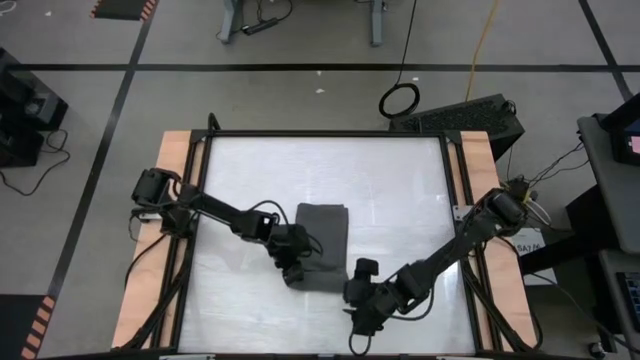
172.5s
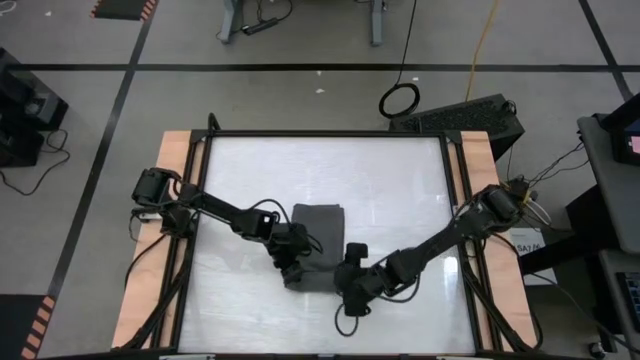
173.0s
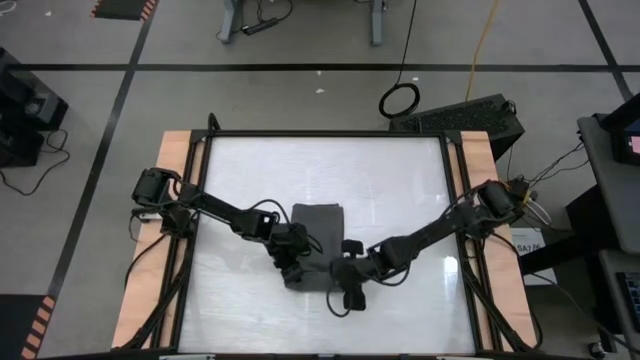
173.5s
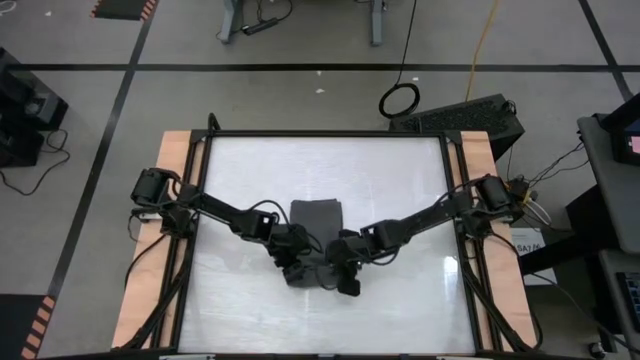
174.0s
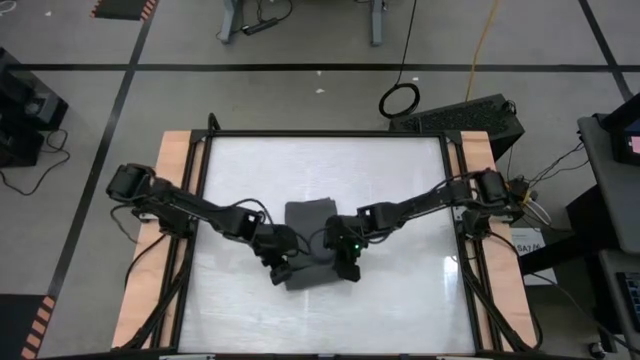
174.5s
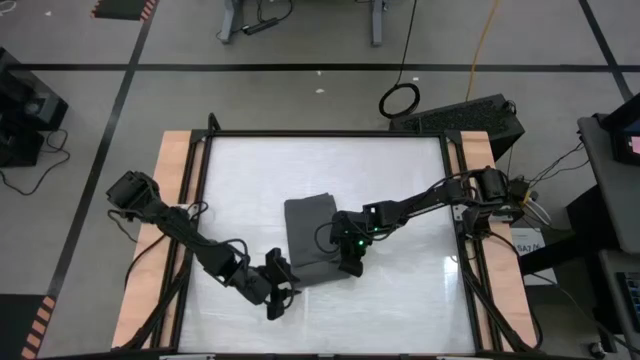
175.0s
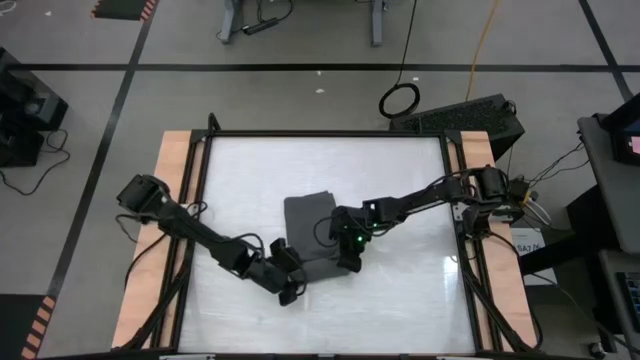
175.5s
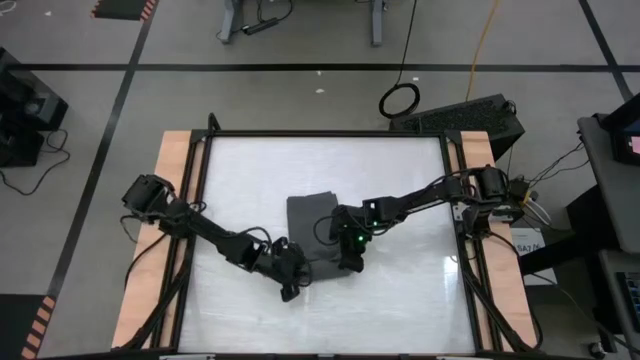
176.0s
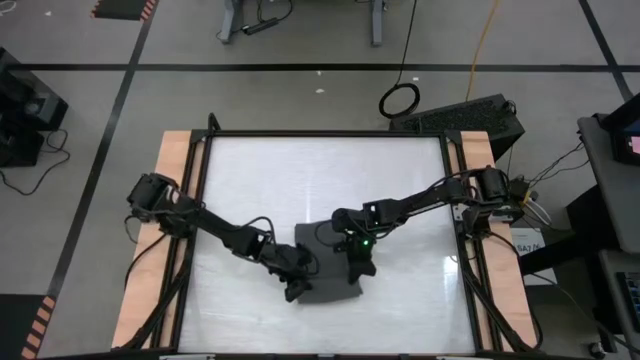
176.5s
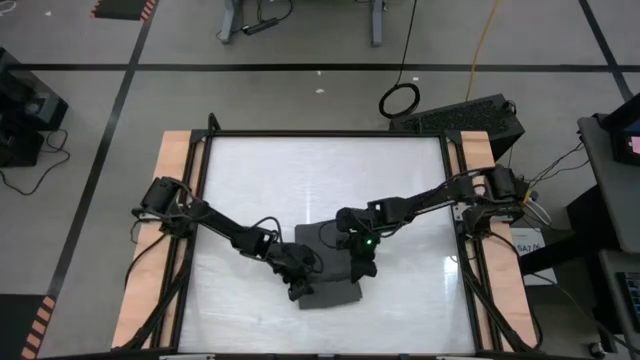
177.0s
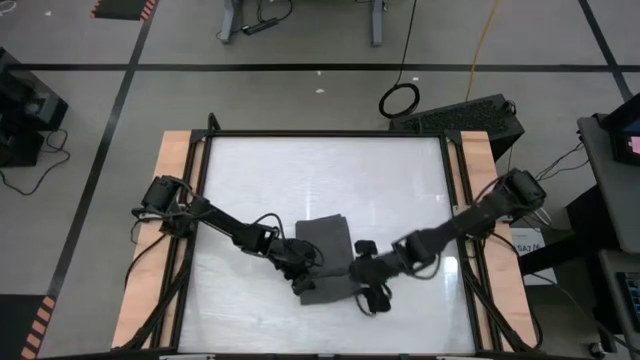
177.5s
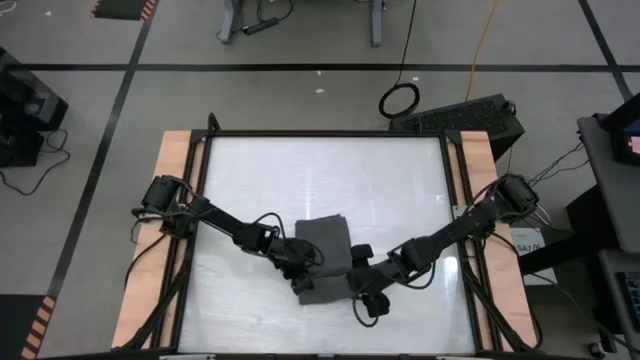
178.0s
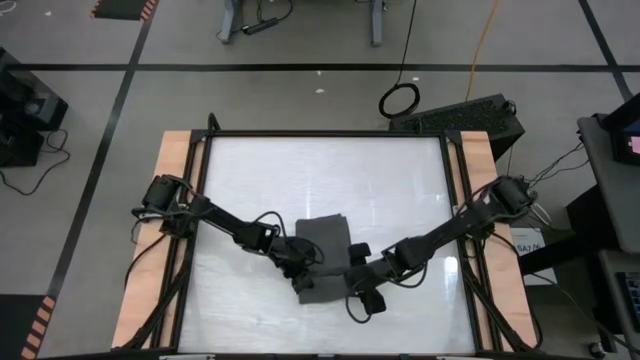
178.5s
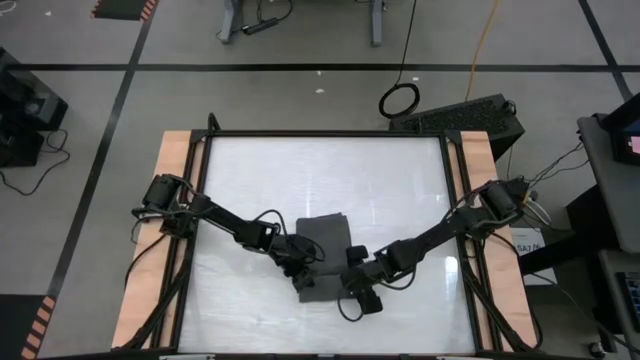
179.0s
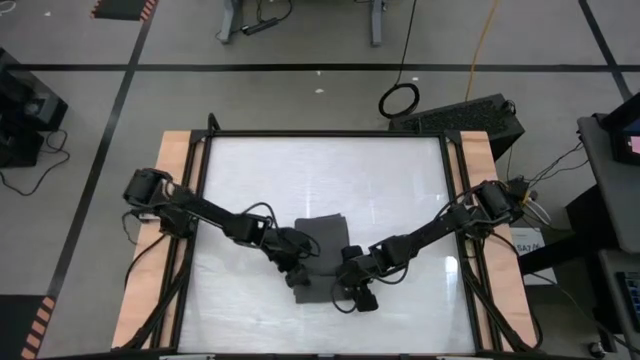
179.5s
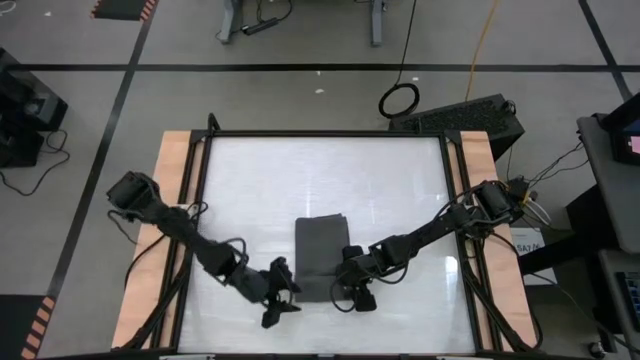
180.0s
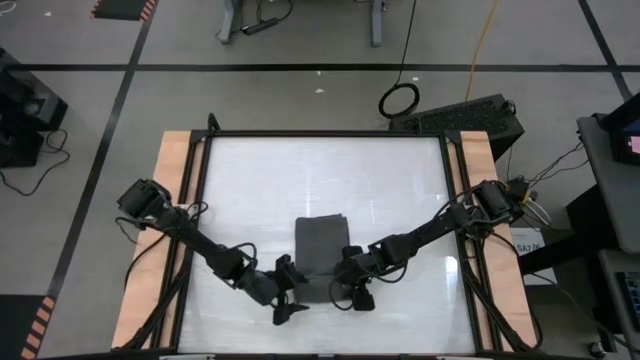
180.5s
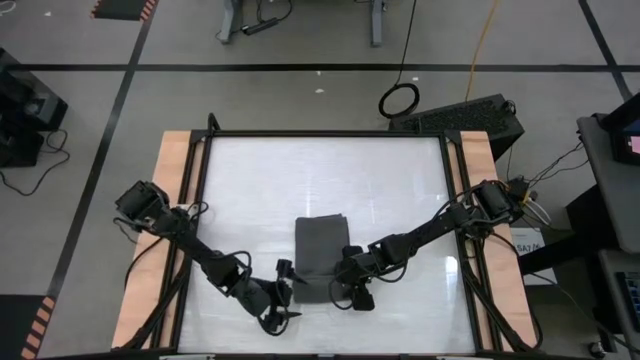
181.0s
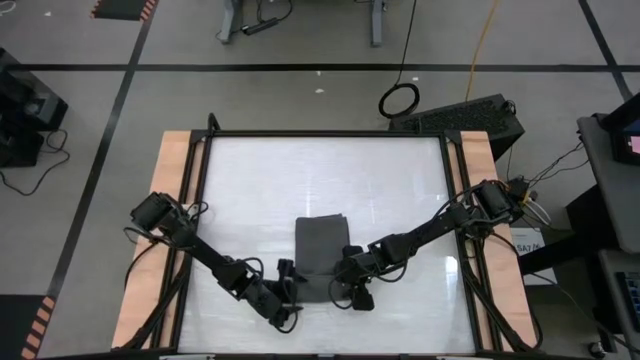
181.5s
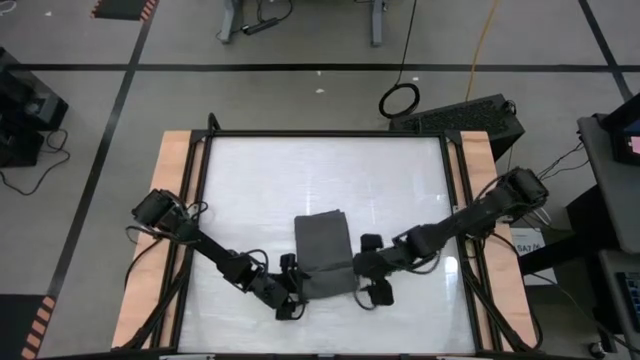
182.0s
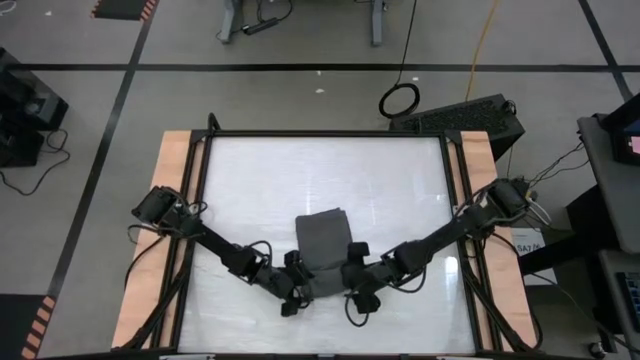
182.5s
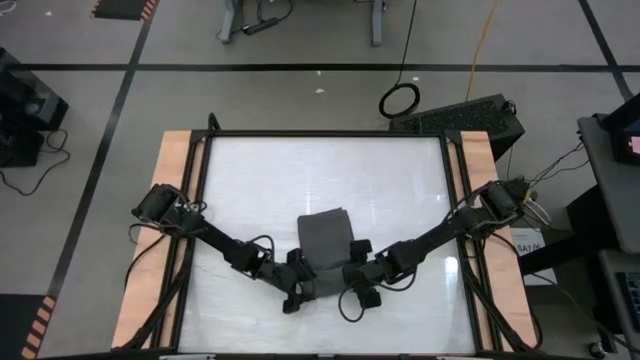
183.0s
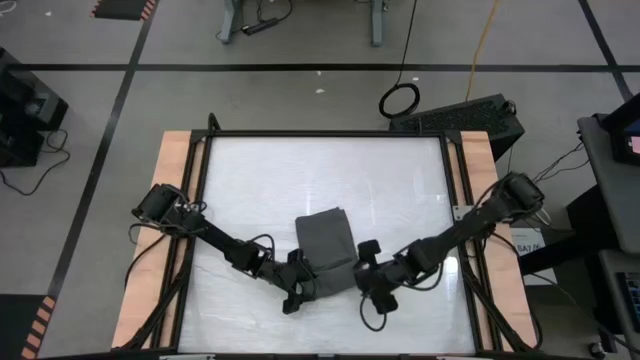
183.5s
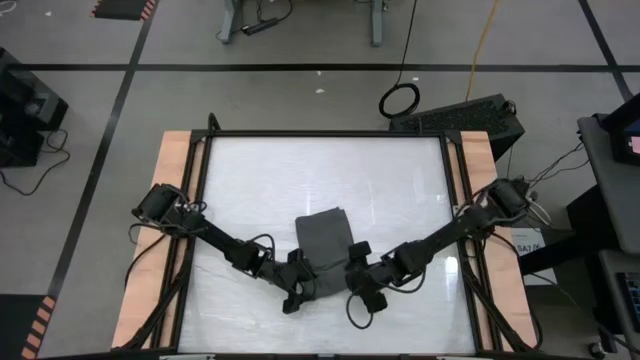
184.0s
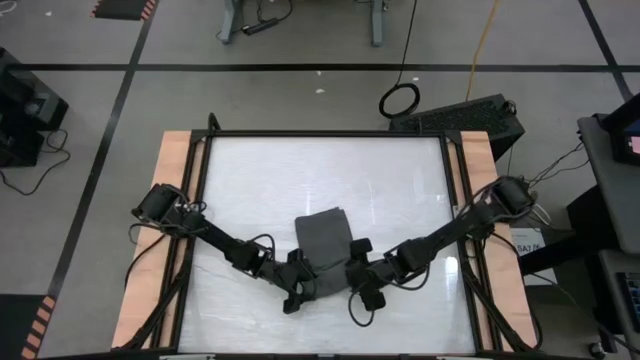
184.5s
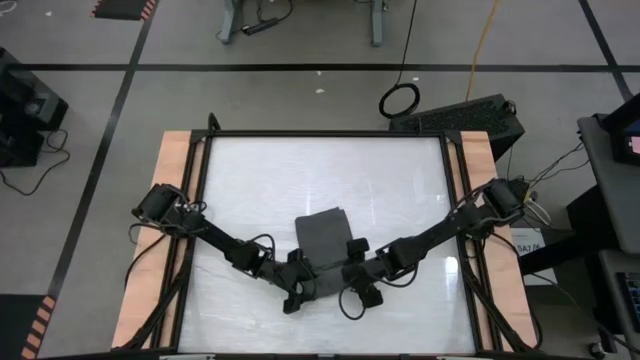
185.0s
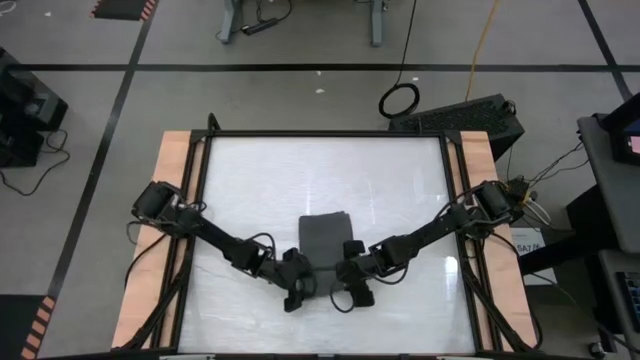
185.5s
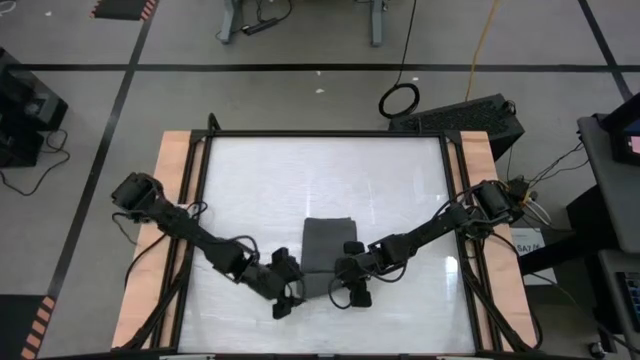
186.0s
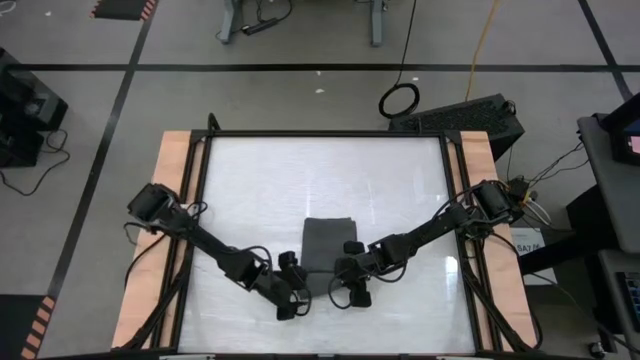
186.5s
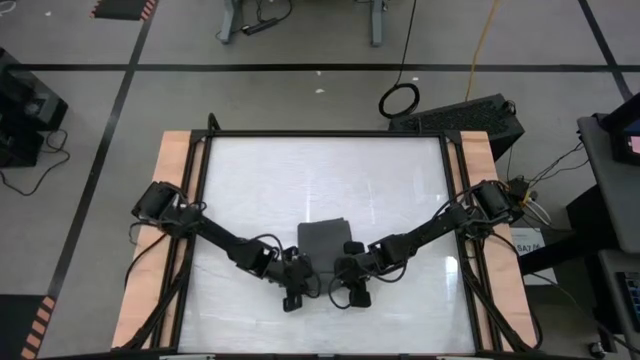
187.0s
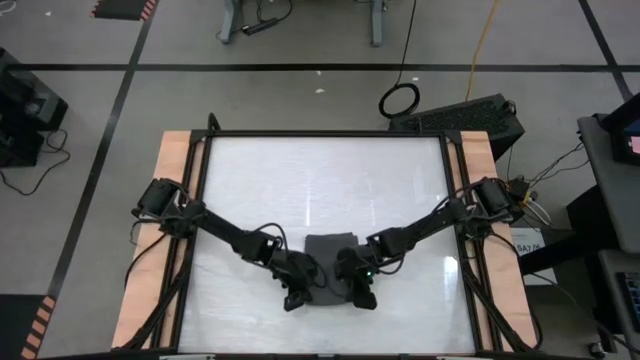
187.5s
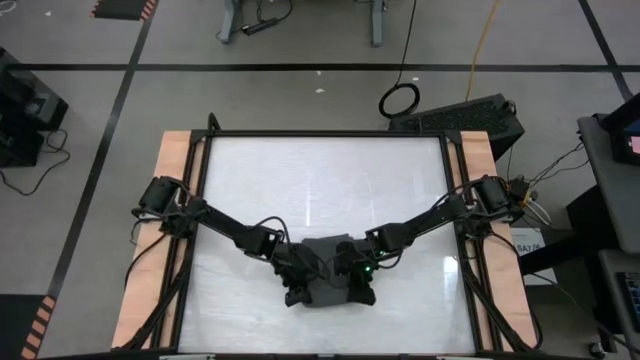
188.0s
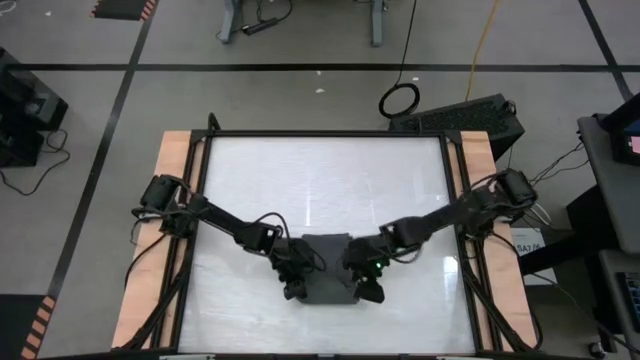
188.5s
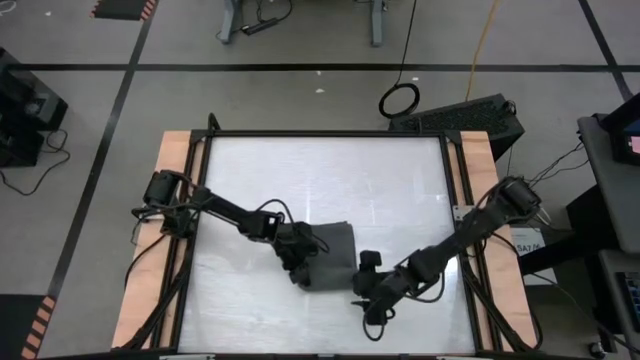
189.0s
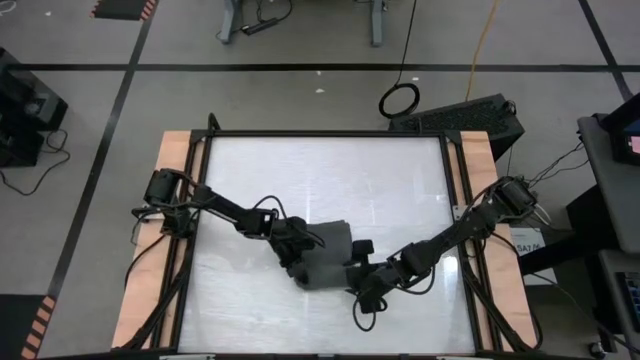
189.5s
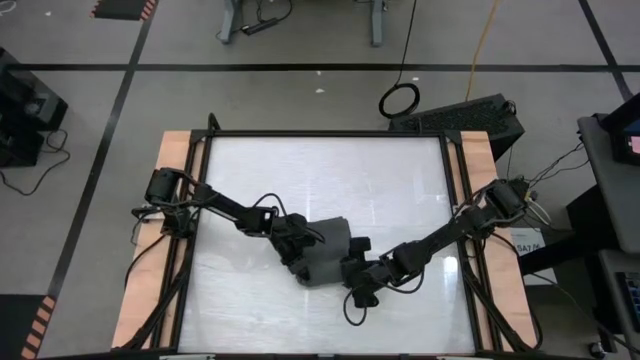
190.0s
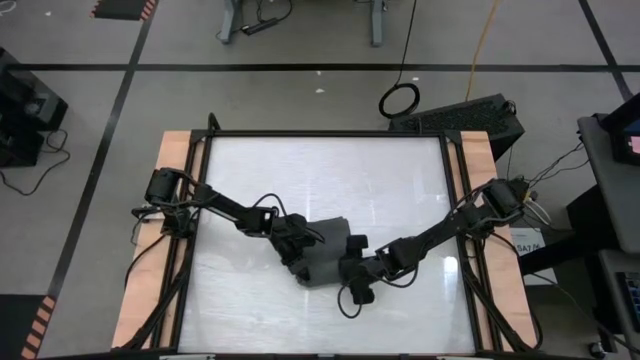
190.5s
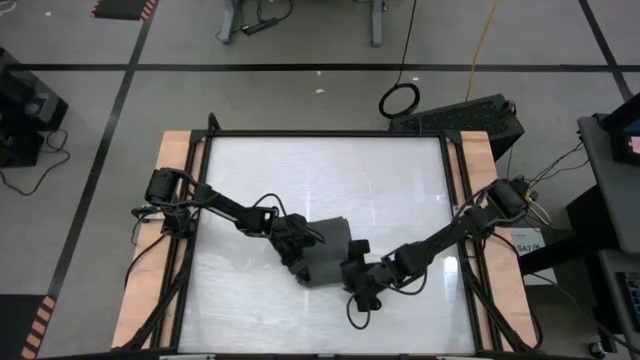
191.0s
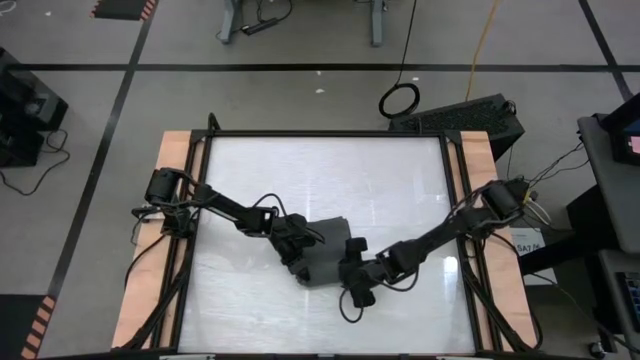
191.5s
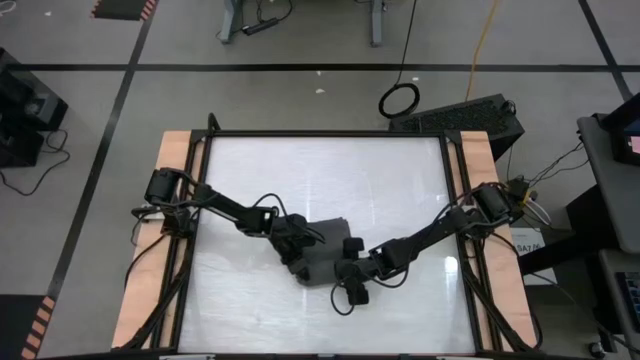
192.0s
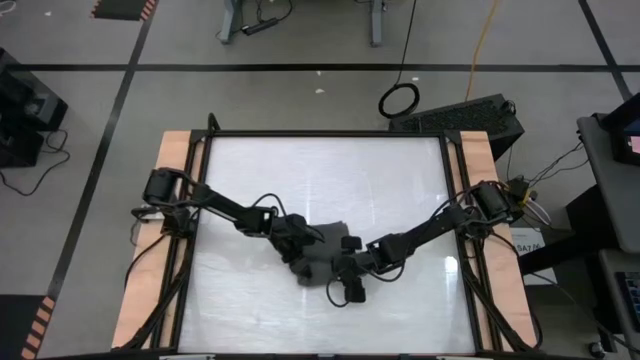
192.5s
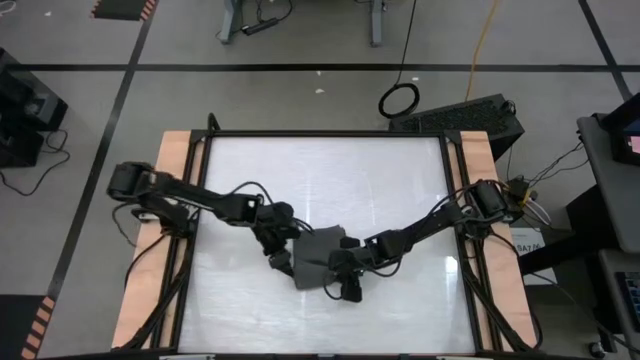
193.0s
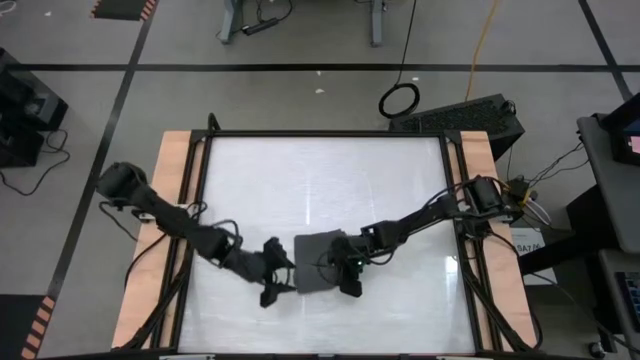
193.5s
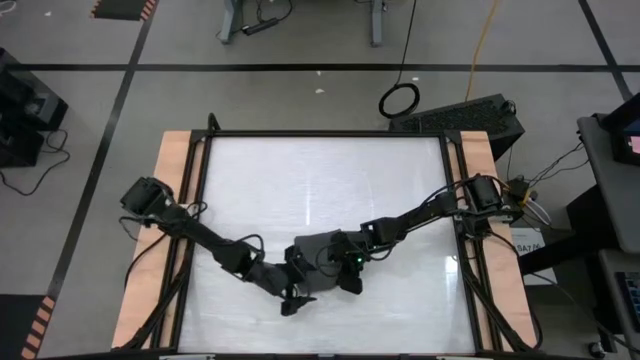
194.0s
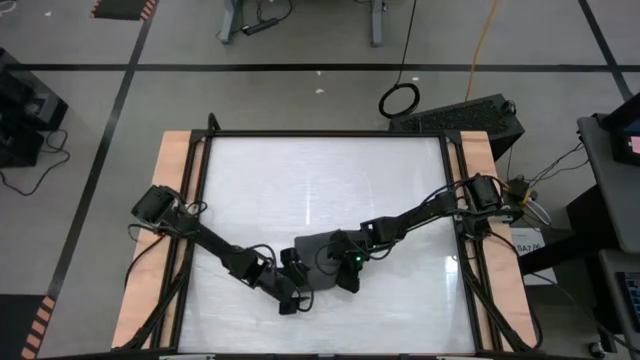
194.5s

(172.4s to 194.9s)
Task: Roll towel into tight, uniform cylinder
Roll the gray towel
